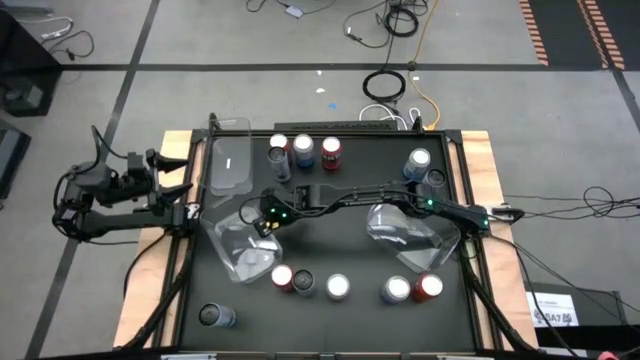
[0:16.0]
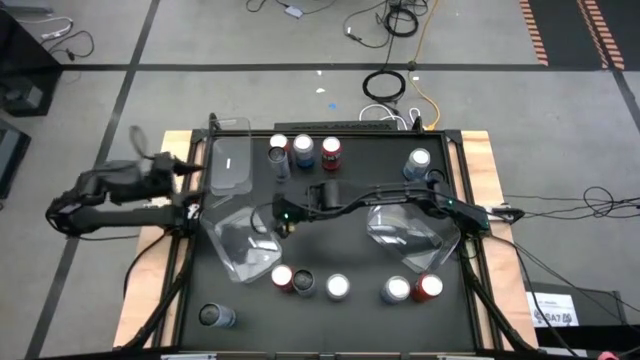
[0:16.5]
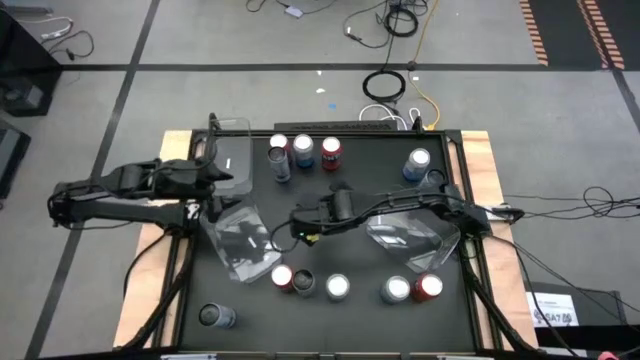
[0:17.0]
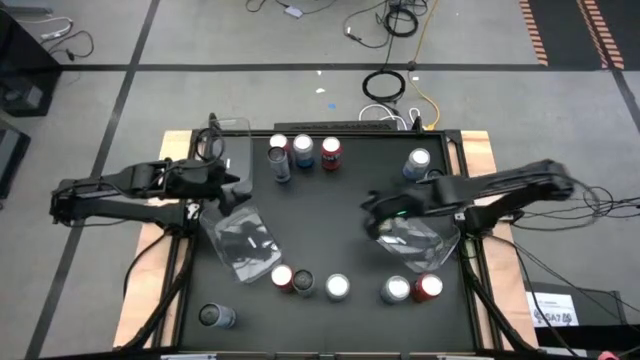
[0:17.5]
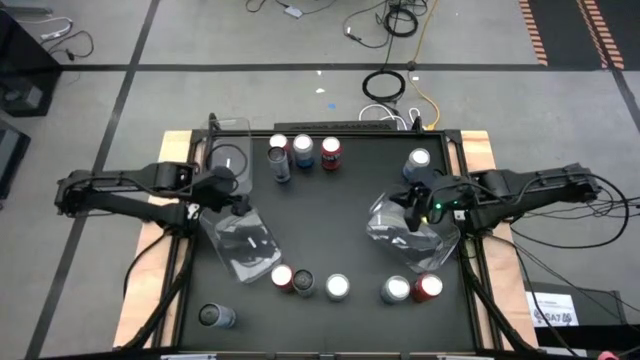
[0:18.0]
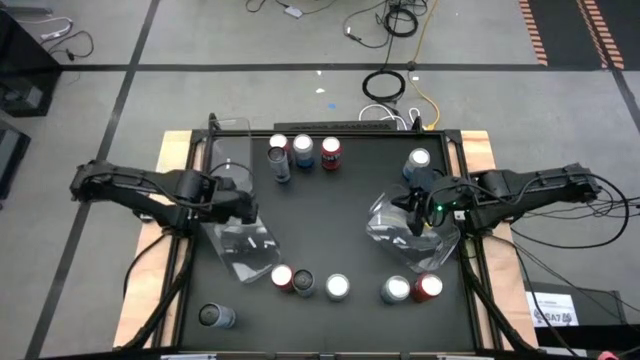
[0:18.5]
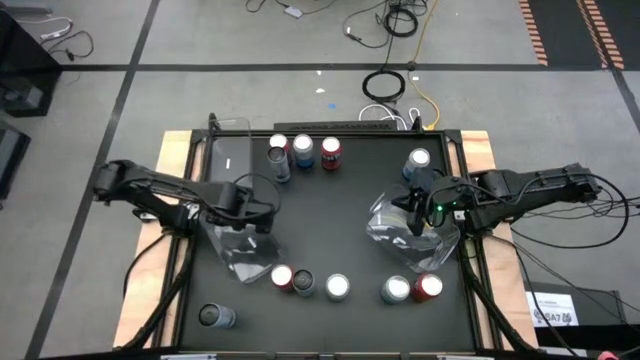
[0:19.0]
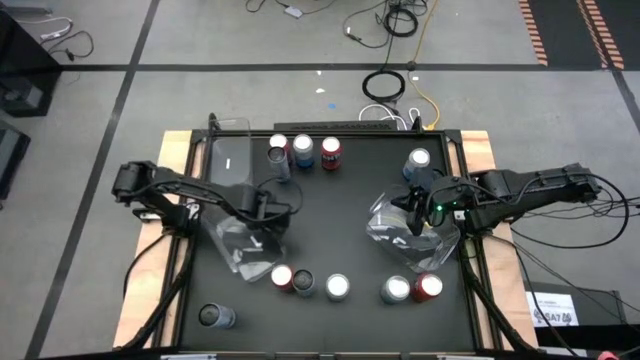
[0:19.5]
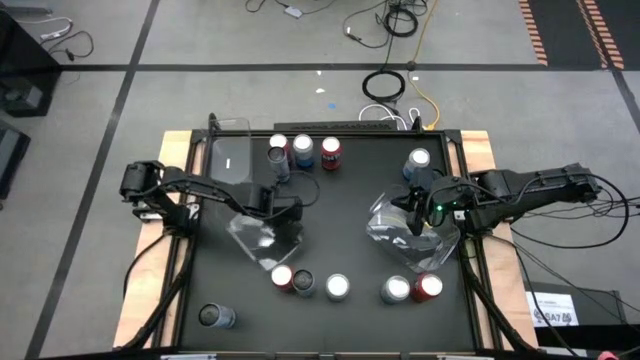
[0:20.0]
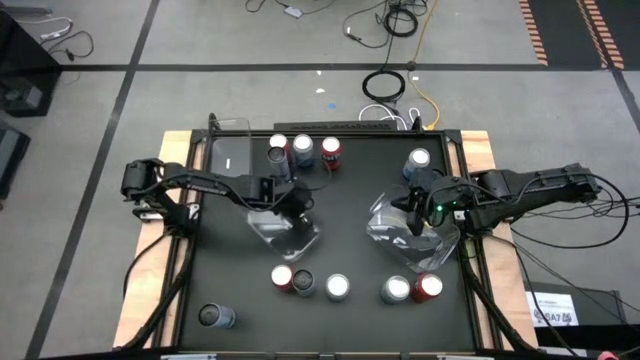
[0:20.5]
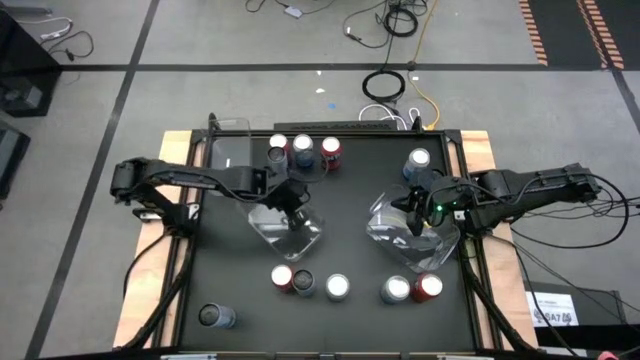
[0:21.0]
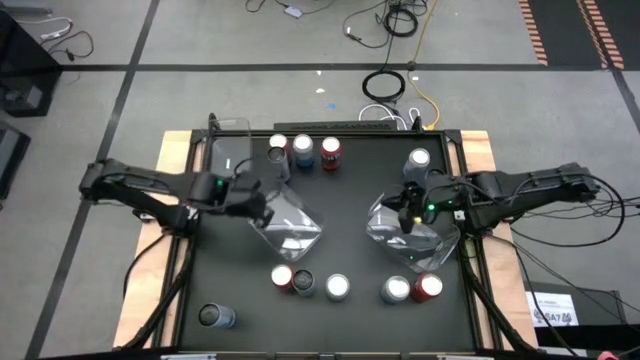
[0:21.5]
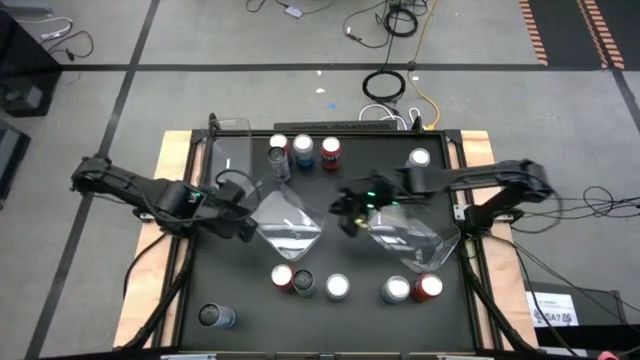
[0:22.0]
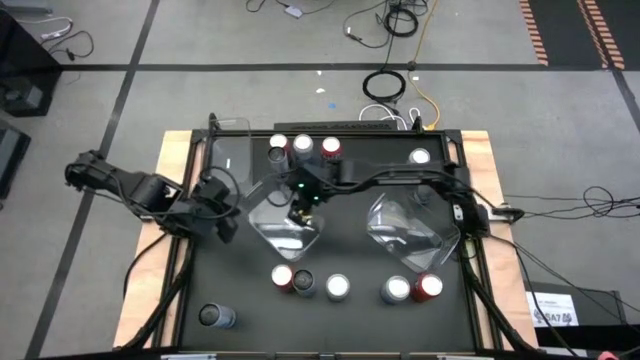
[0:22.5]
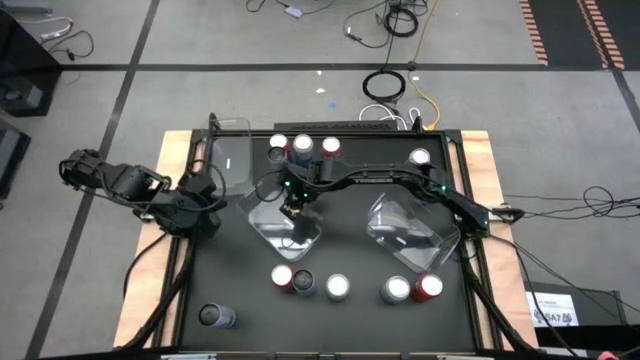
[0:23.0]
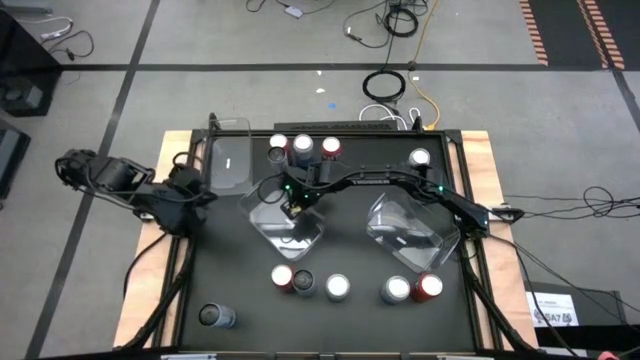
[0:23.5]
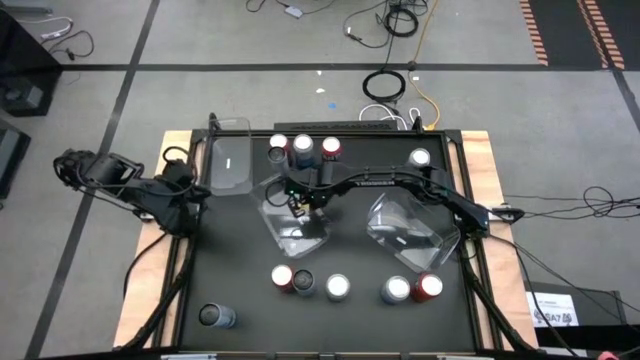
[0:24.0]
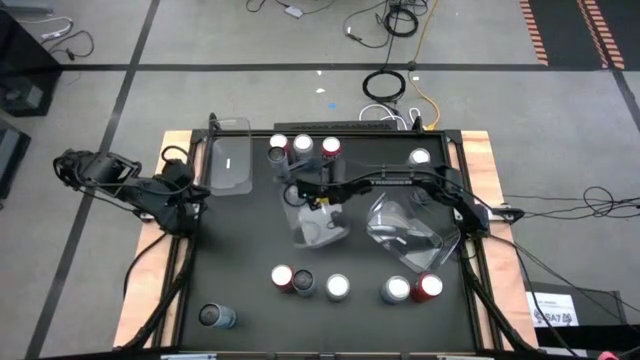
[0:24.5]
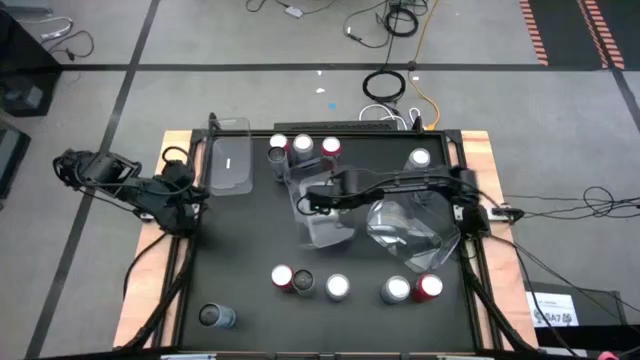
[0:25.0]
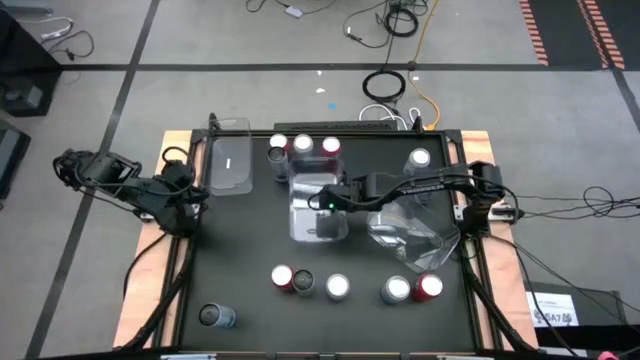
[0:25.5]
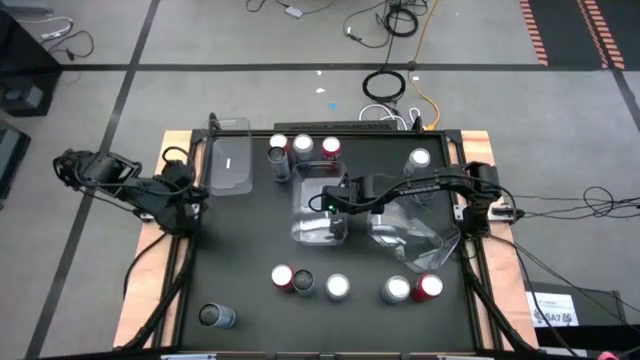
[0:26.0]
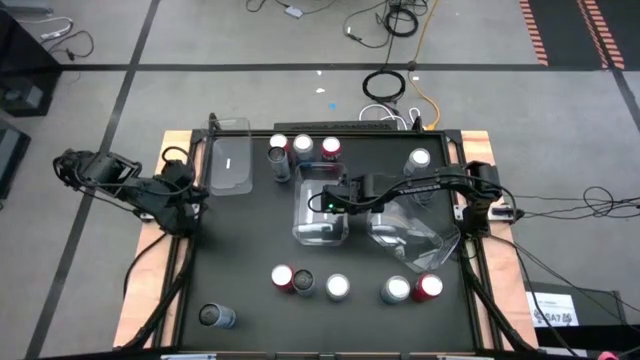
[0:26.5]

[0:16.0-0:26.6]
Task: Sort soda cans
Move the bottom left transparent bin to the center of the table

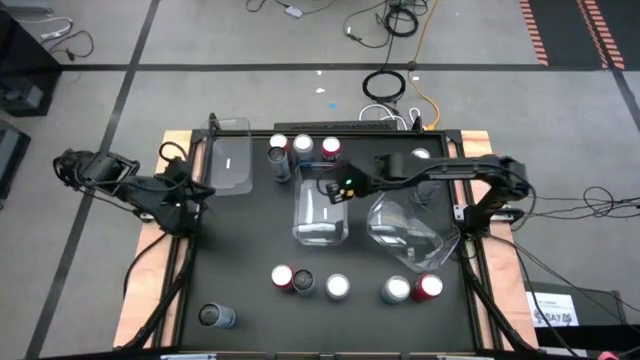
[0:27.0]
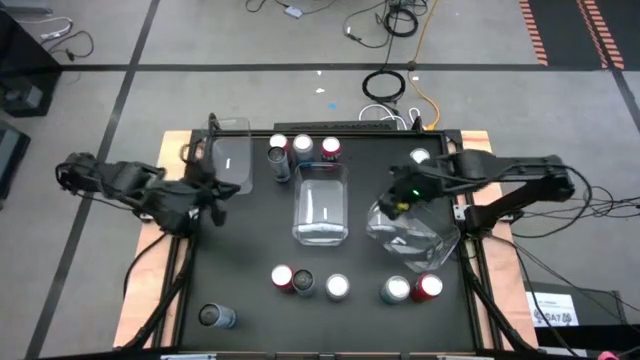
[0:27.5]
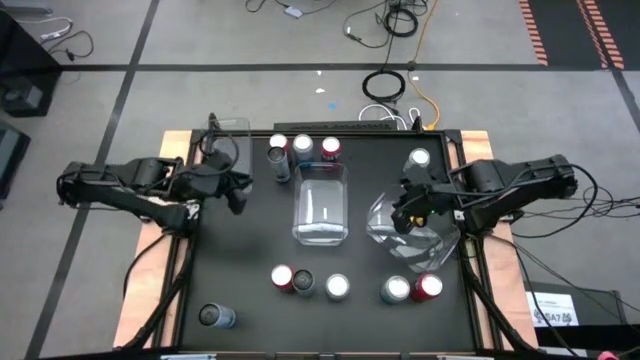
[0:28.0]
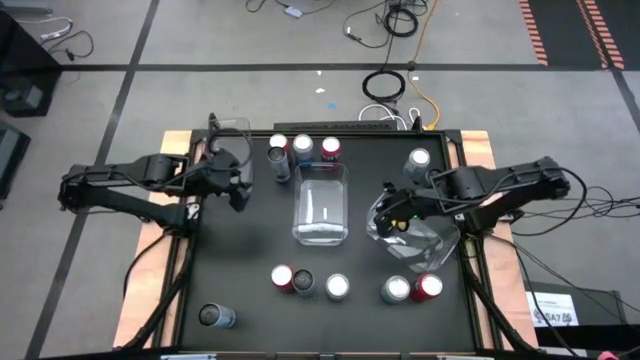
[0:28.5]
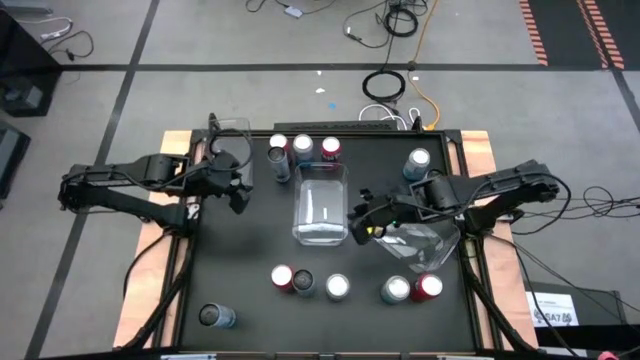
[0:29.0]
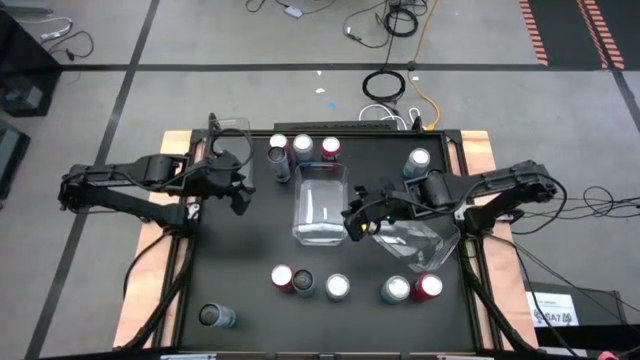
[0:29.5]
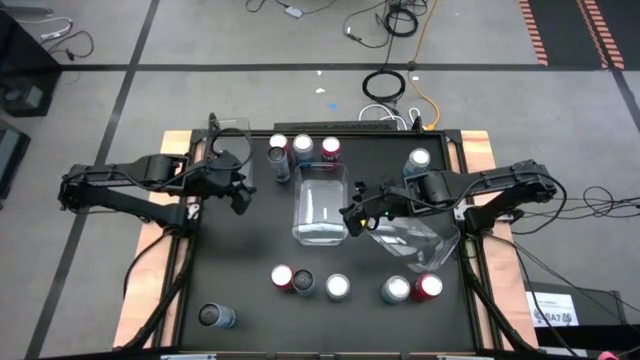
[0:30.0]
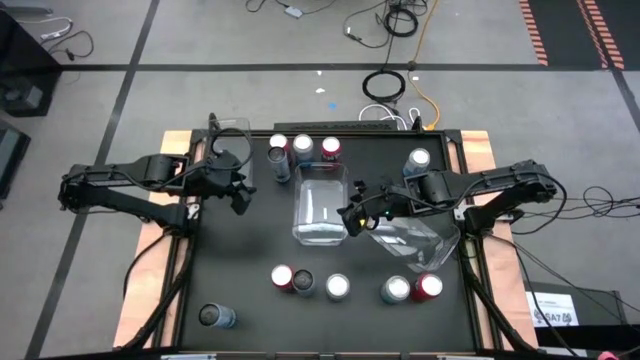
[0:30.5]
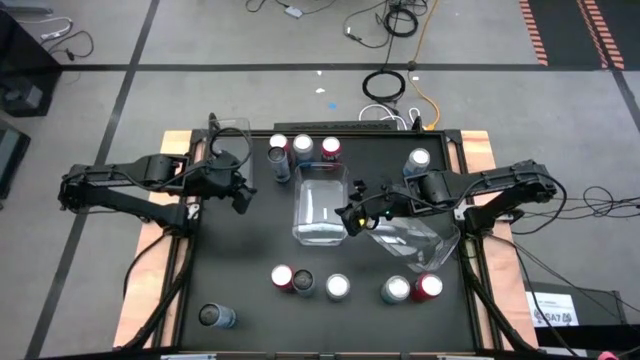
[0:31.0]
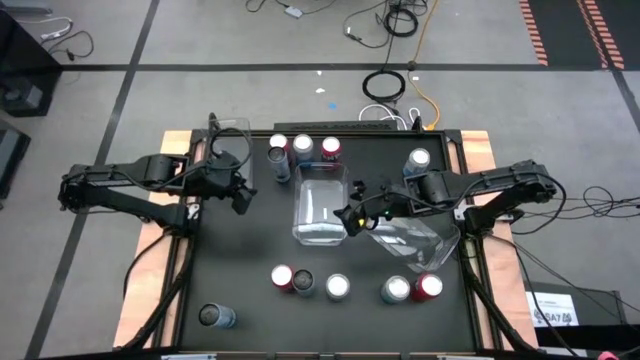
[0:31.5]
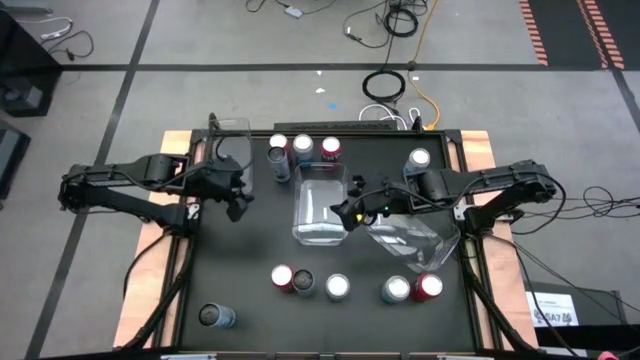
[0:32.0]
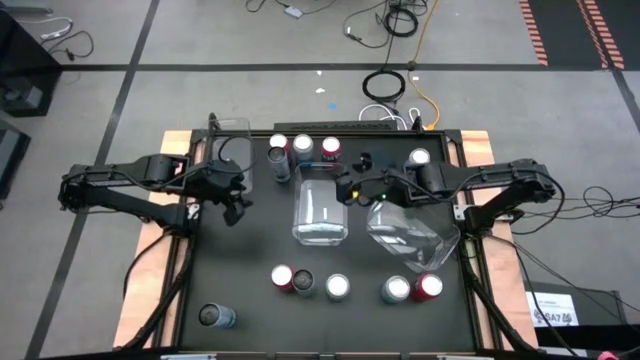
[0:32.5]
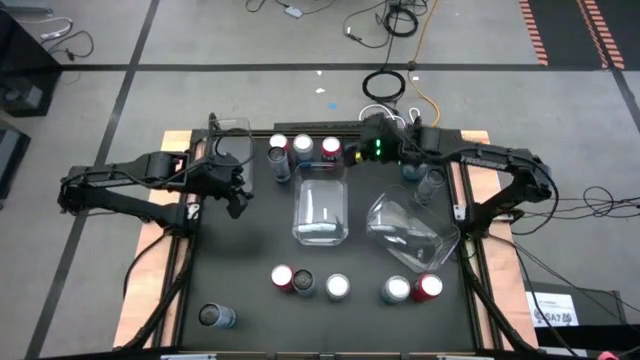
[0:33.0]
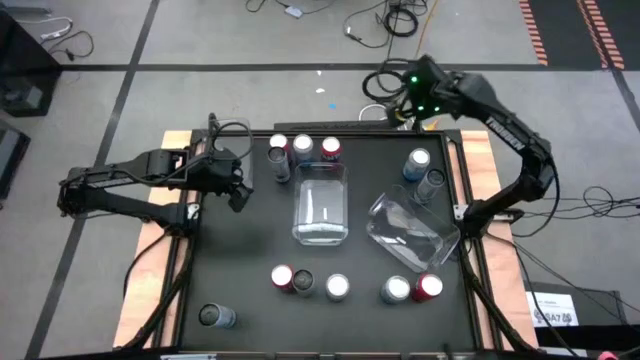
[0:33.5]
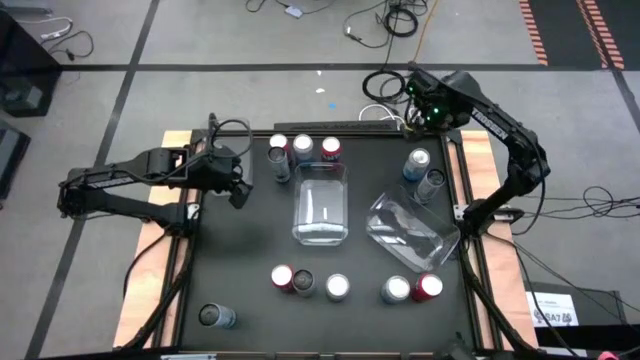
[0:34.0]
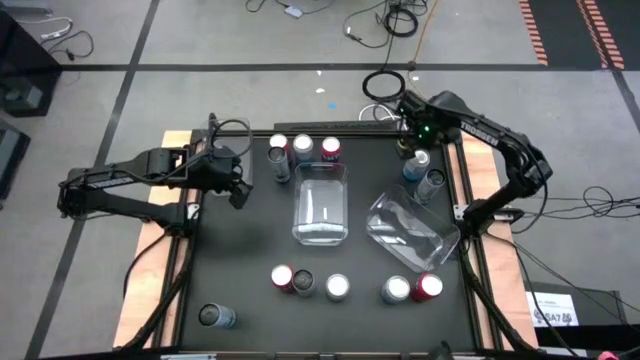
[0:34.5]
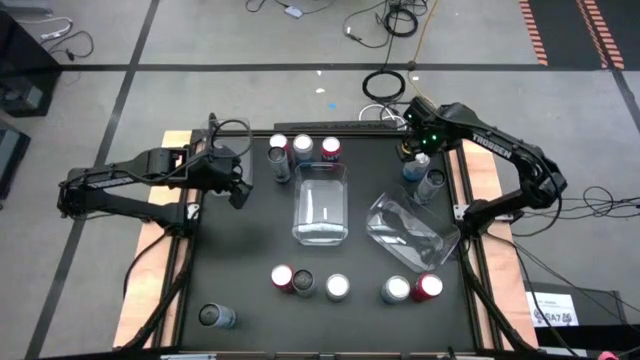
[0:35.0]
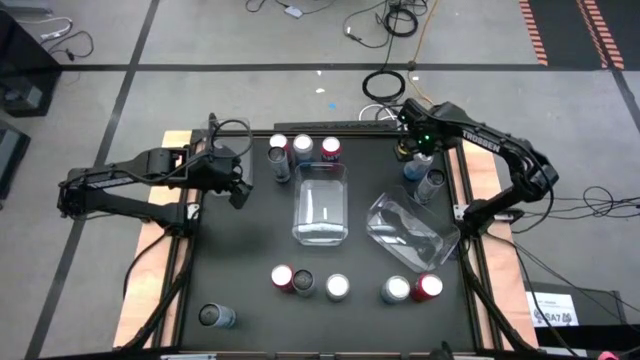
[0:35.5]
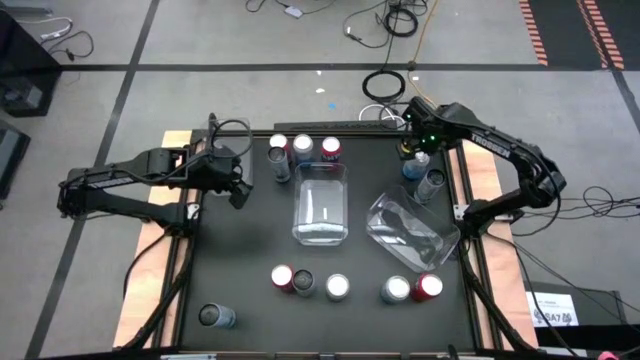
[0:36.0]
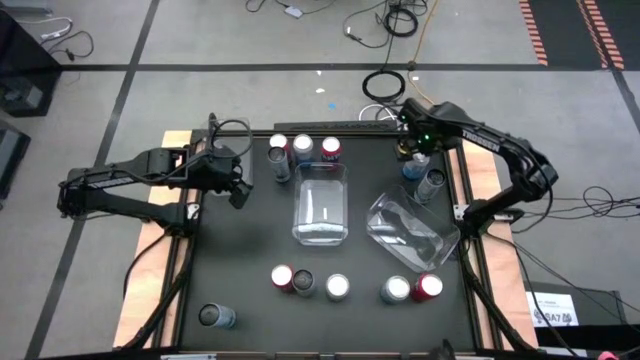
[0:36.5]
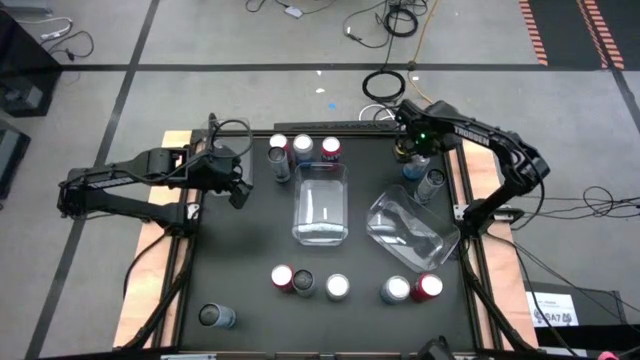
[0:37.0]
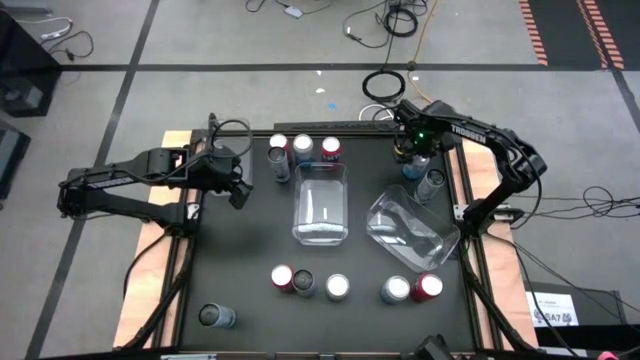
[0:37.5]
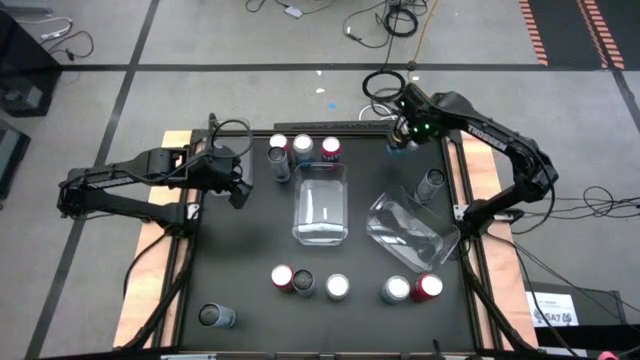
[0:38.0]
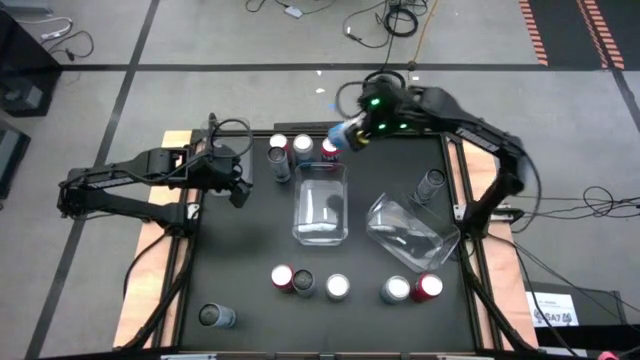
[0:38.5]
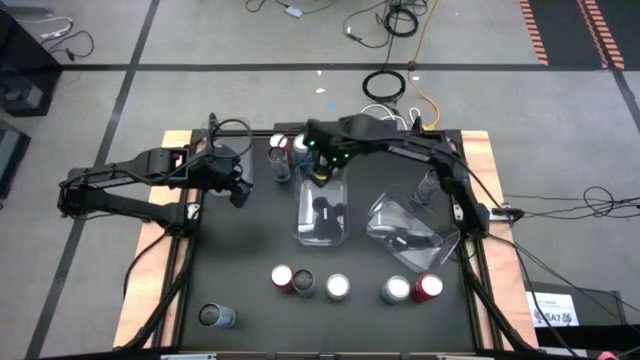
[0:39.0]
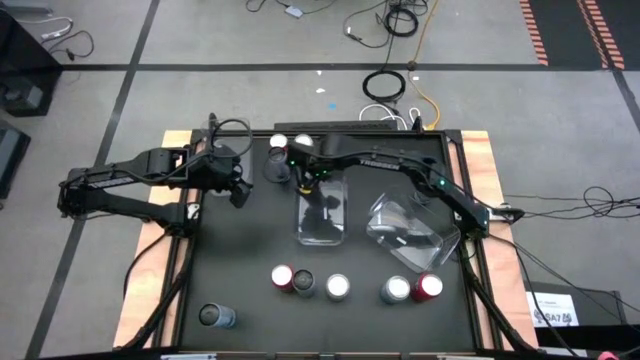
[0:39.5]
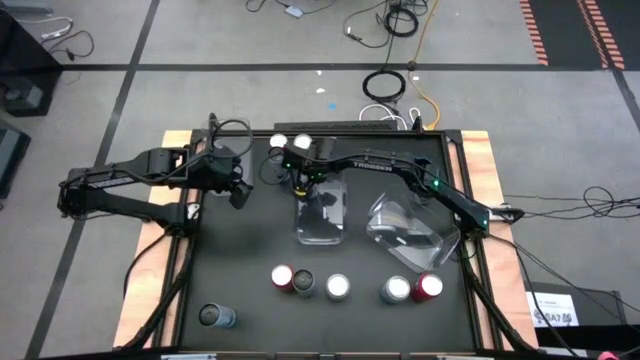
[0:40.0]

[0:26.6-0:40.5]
Put the top right blue-white soda can into the center transparent bin
